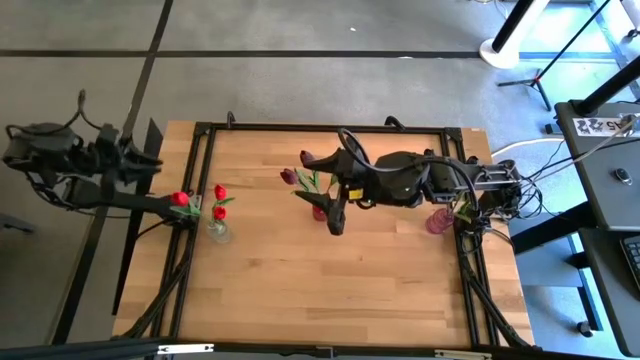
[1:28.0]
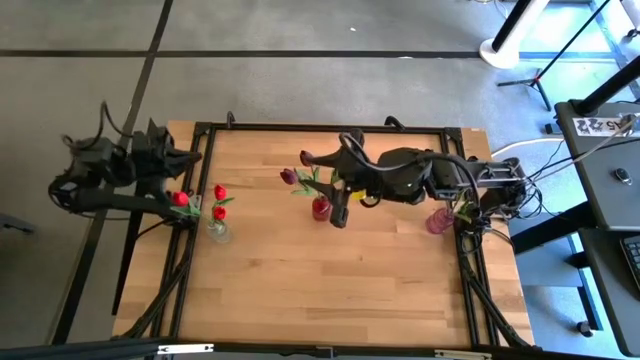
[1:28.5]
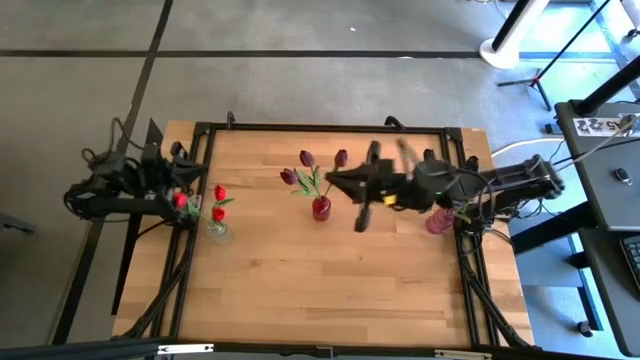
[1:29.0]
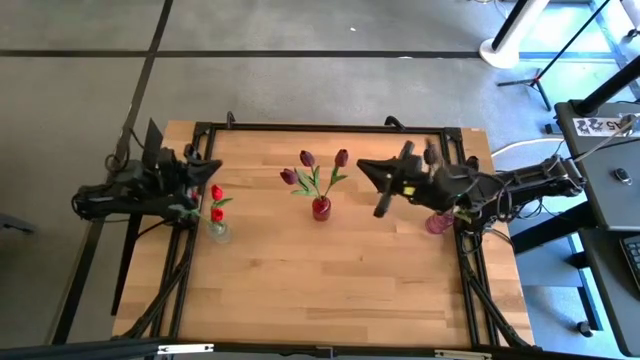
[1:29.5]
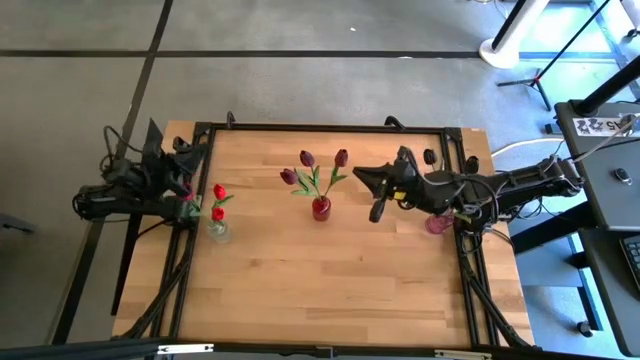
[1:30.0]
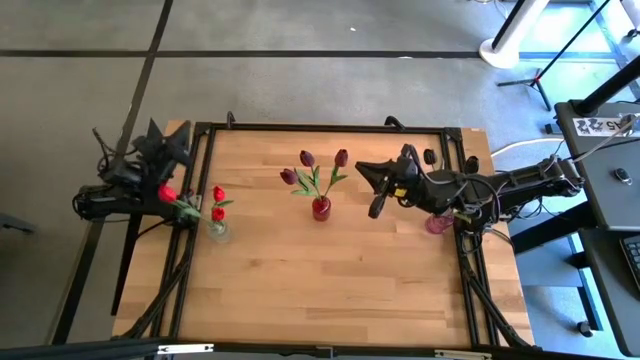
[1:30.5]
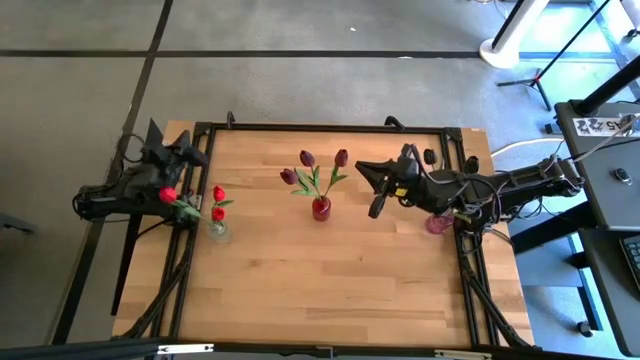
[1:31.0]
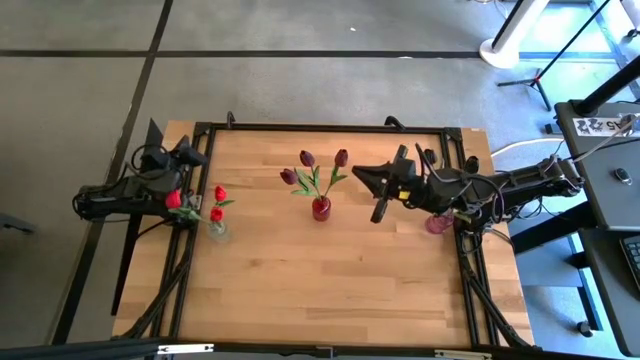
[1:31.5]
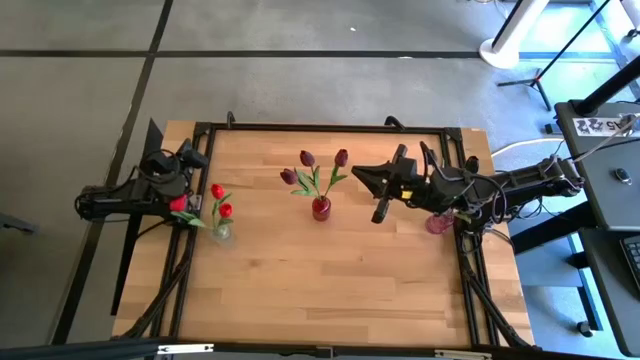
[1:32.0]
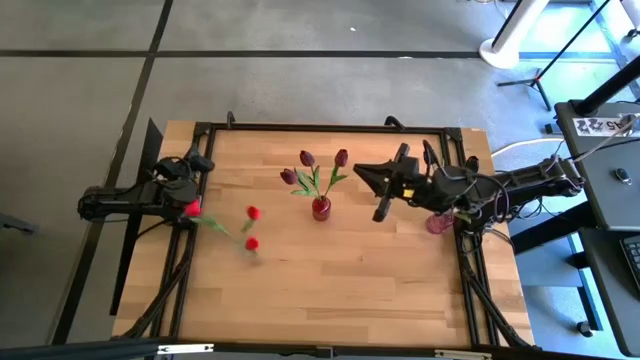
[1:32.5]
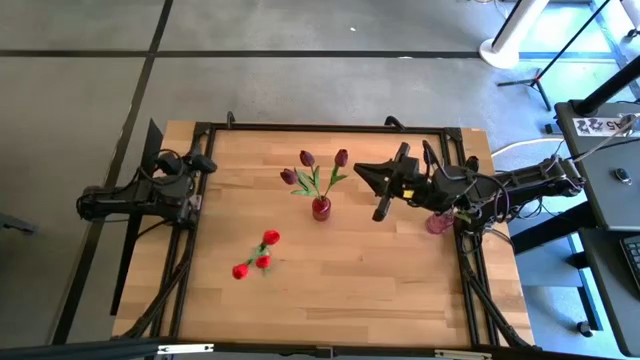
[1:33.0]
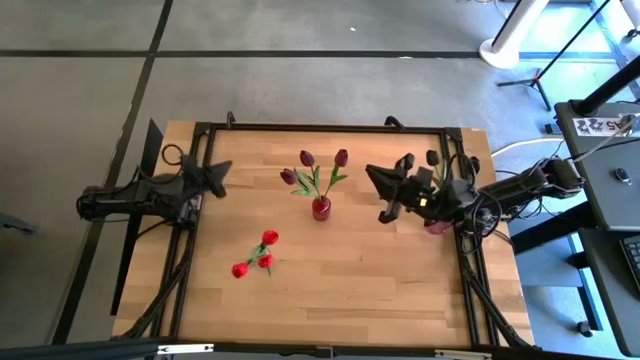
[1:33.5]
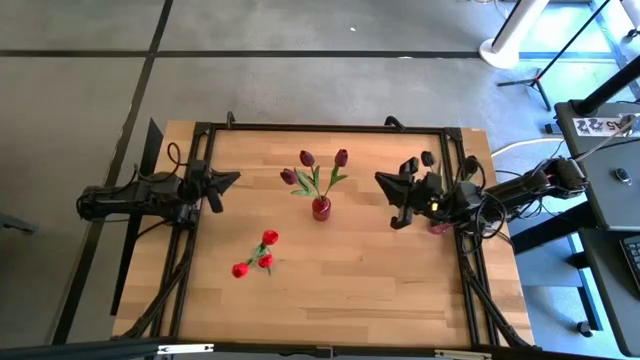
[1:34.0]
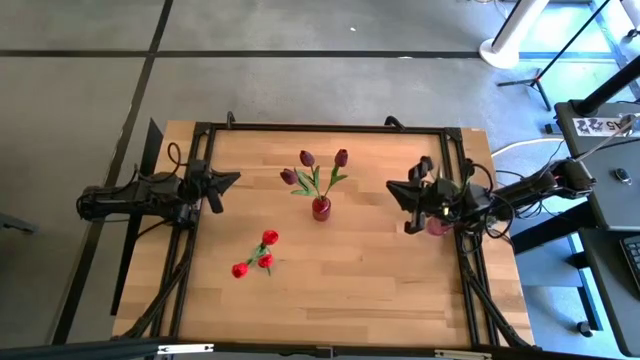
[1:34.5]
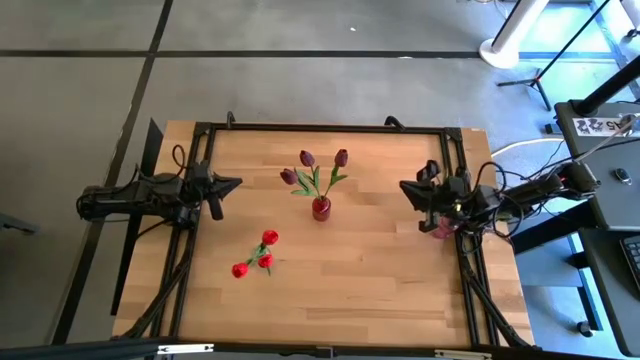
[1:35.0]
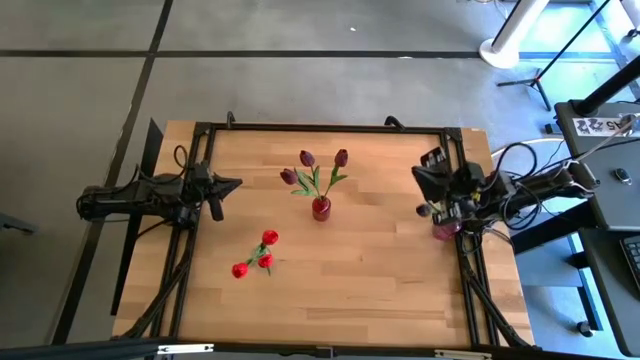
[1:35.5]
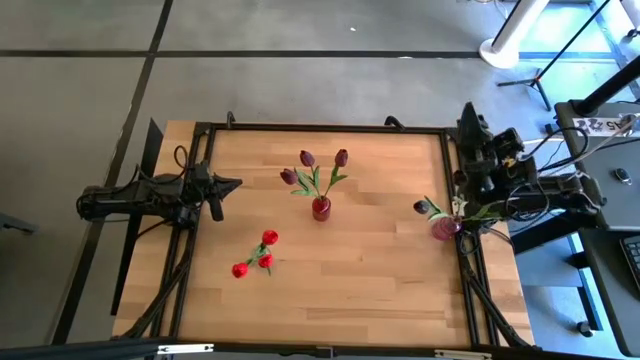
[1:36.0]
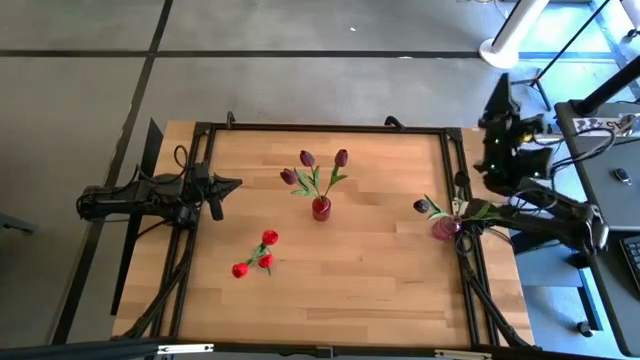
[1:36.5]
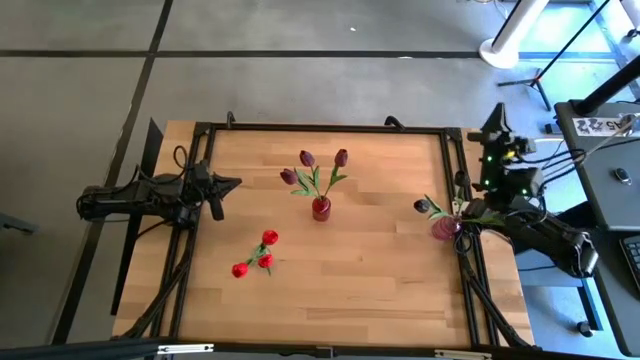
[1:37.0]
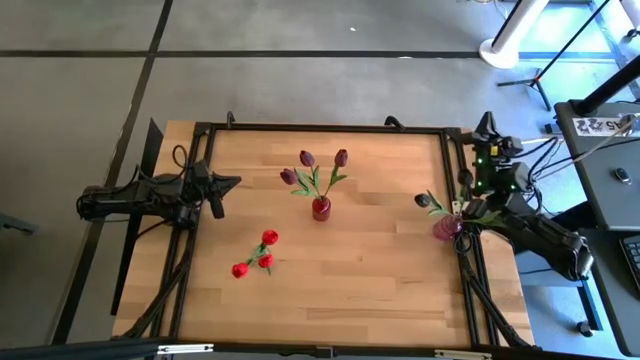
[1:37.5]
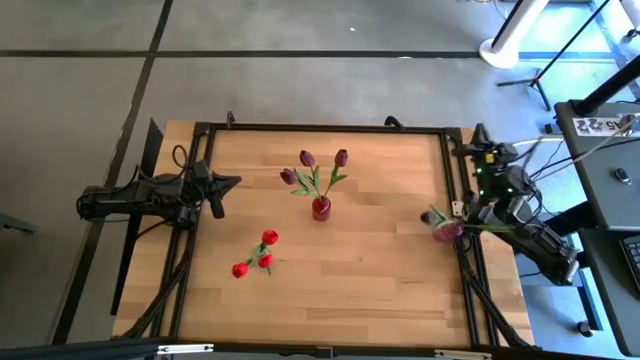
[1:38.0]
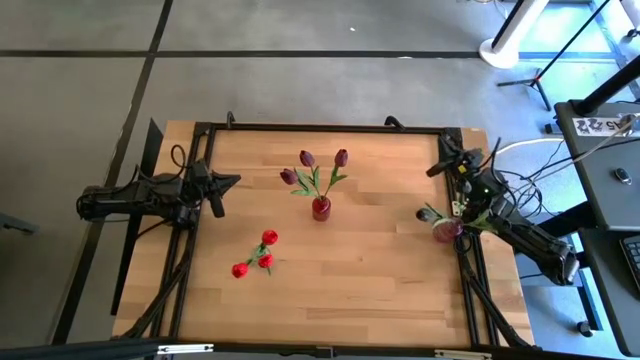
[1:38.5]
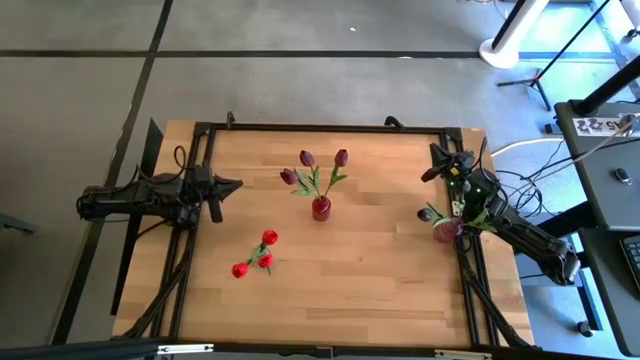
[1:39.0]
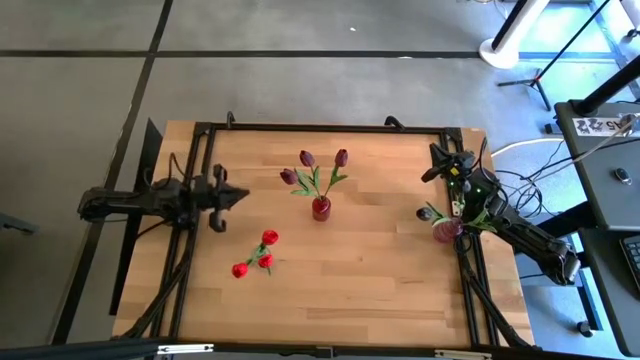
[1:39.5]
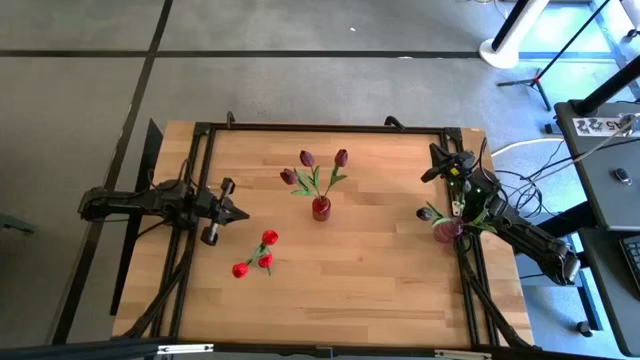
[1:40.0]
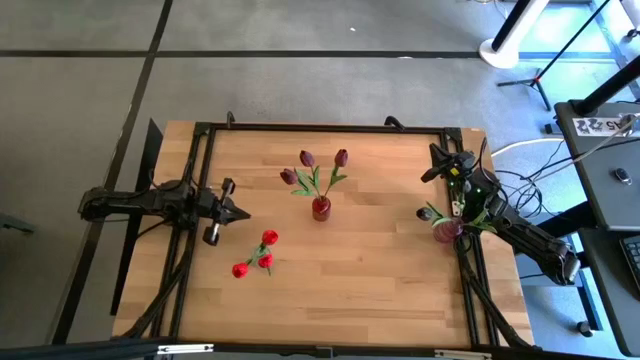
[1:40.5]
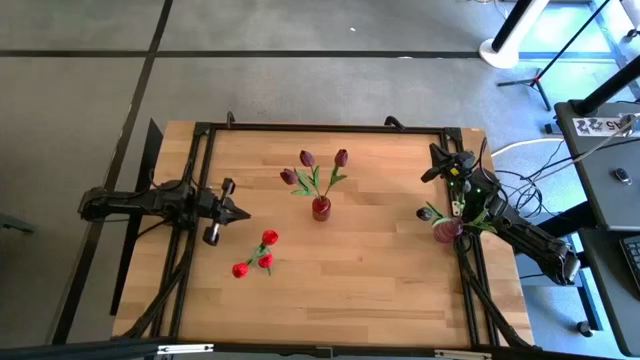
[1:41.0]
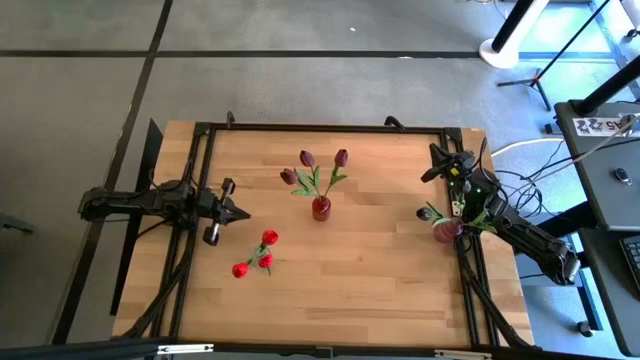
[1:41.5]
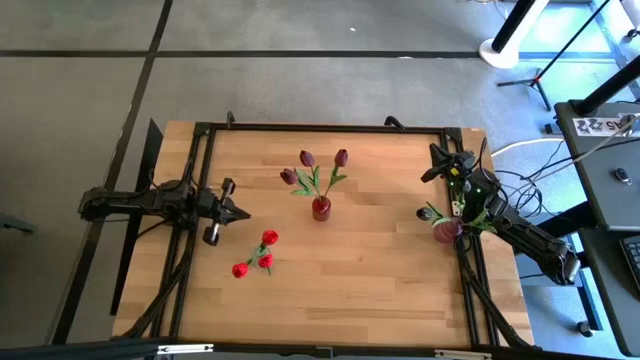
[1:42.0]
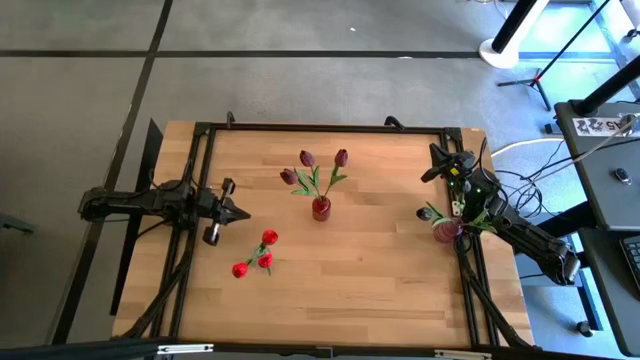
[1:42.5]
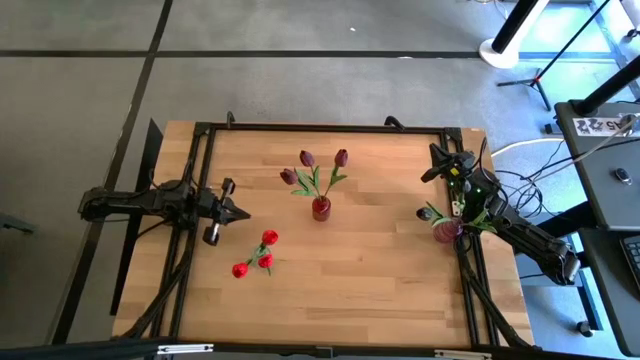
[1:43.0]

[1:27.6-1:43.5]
Task: Sort flowers into vase by color
Return to Home Position

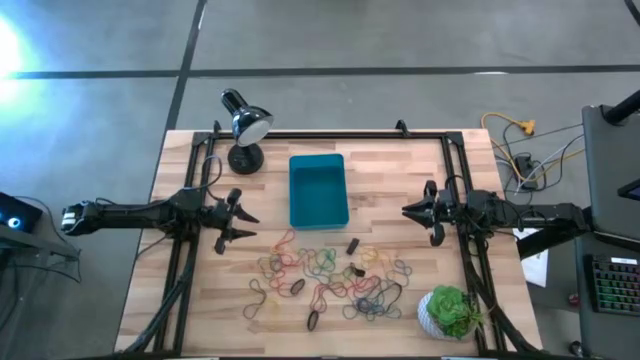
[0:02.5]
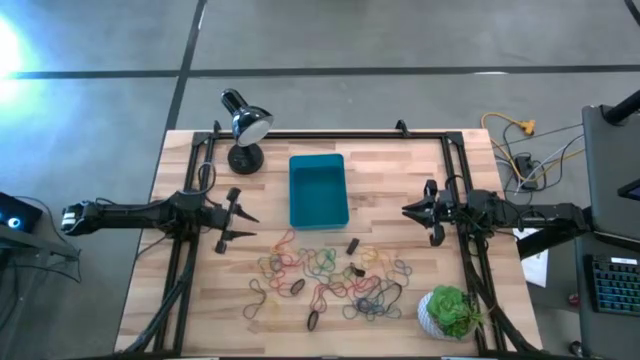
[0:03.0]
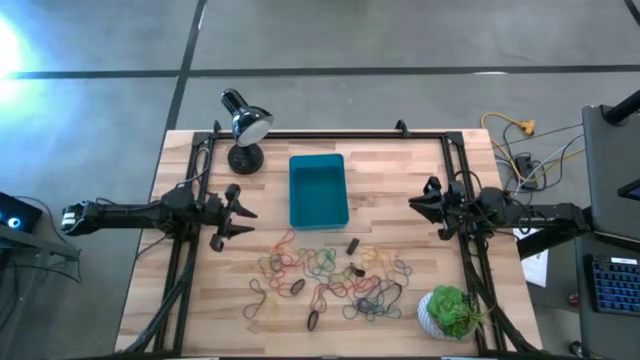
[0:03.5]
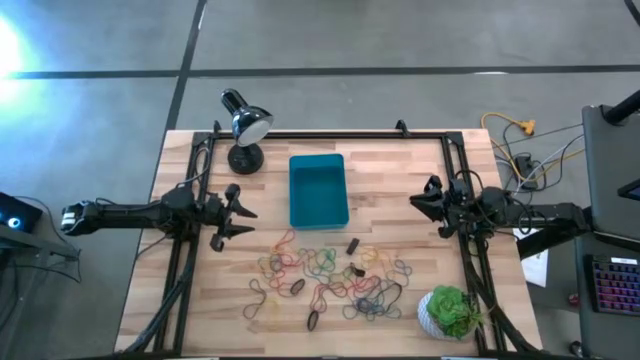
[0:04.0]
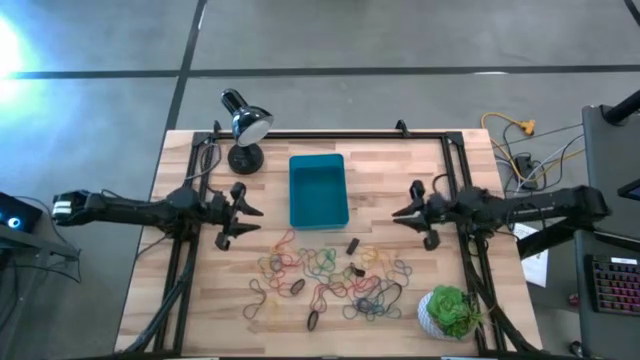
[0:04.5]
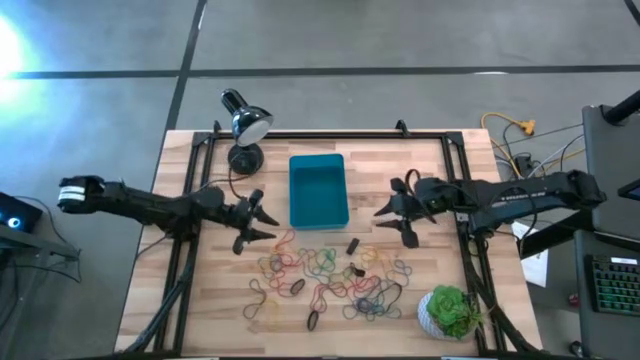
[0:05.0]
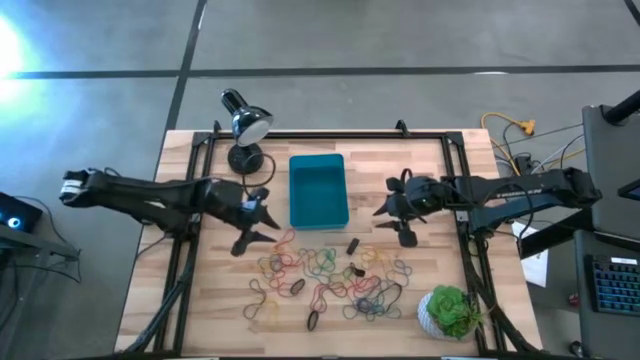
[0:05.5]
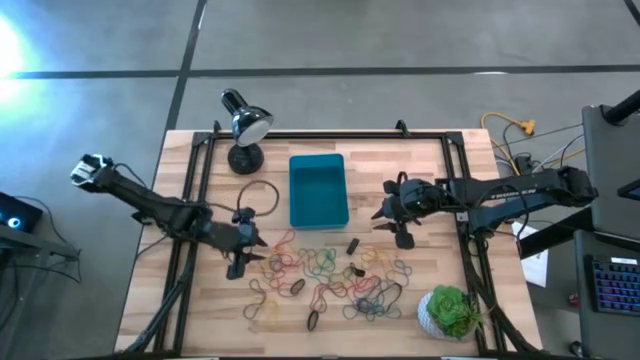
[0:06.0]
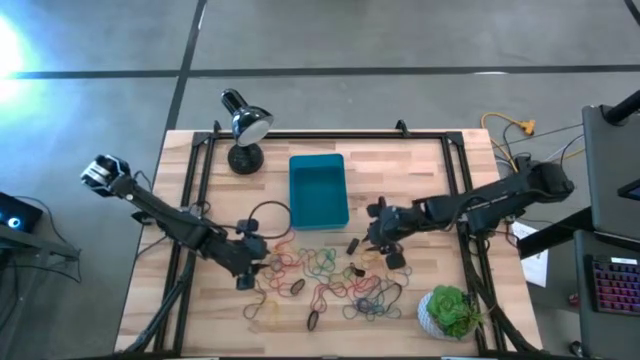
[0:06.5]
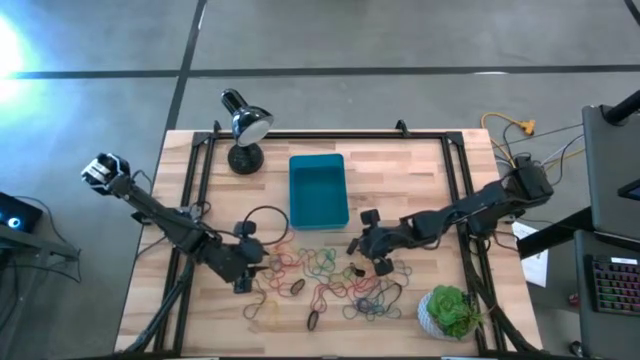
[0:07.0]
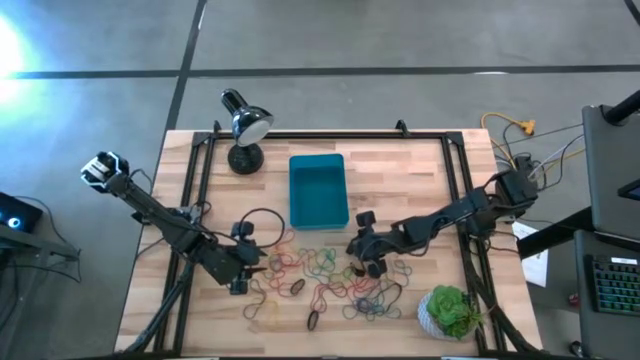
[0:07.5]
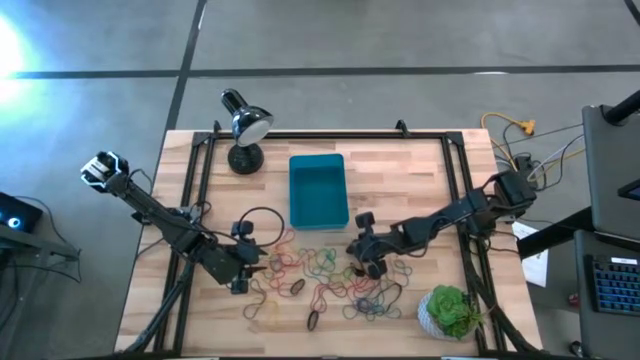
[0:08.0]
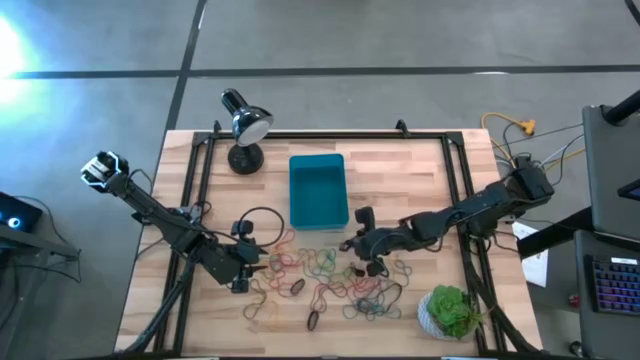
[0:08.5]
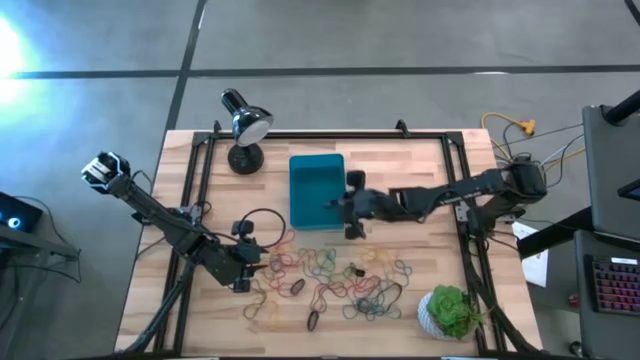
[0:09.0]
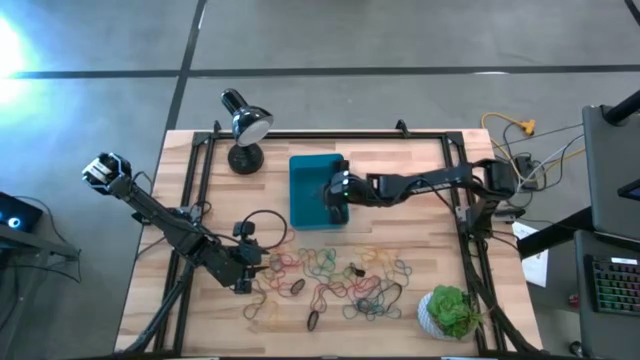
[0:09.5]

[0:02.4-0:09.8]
Task: Pick and place rubber bands into bin
Put the black rubber band into the blue bin
